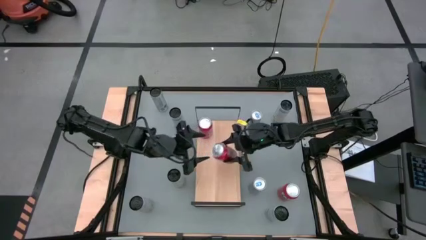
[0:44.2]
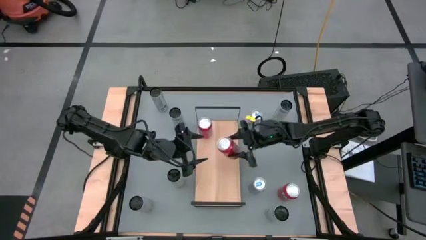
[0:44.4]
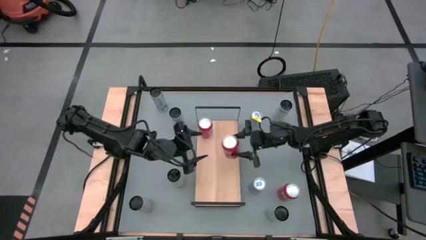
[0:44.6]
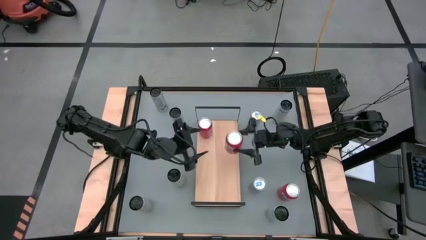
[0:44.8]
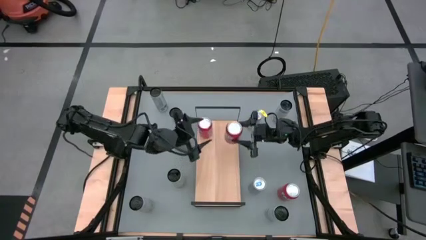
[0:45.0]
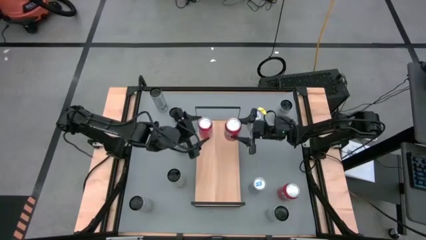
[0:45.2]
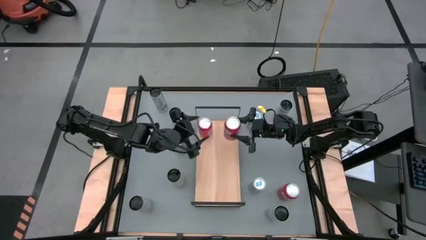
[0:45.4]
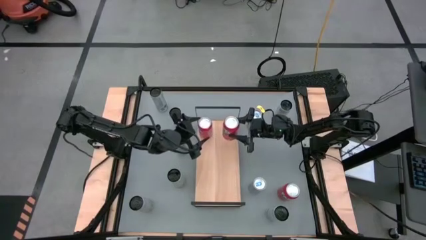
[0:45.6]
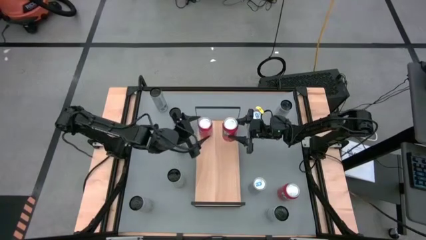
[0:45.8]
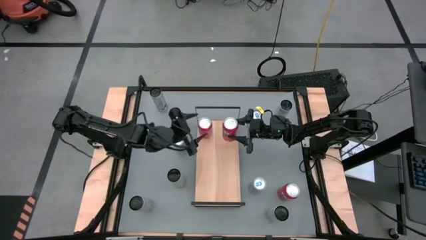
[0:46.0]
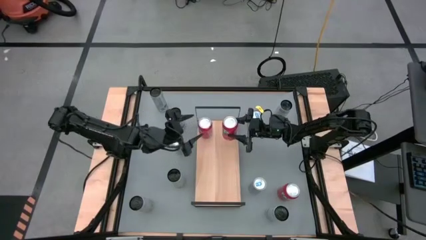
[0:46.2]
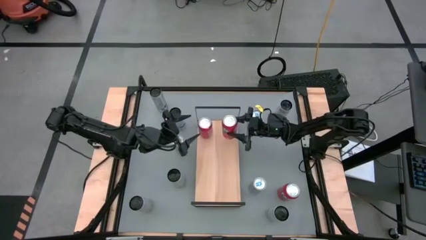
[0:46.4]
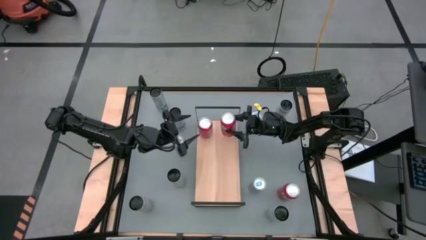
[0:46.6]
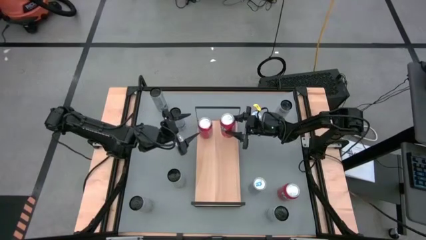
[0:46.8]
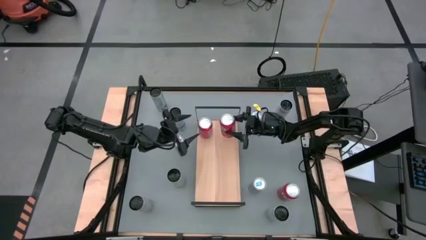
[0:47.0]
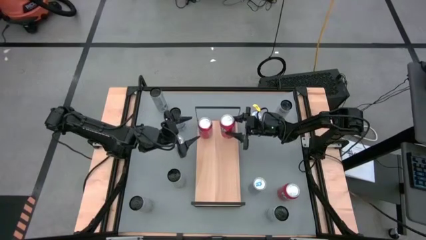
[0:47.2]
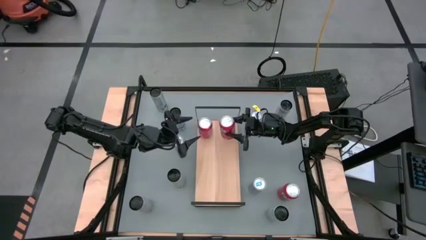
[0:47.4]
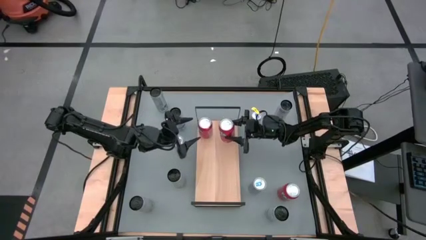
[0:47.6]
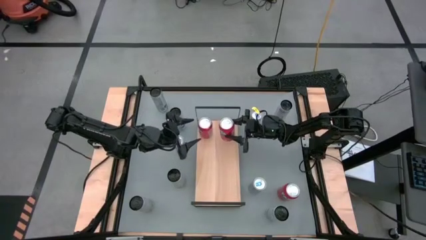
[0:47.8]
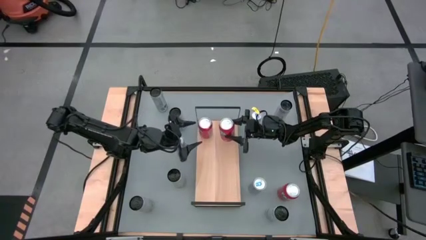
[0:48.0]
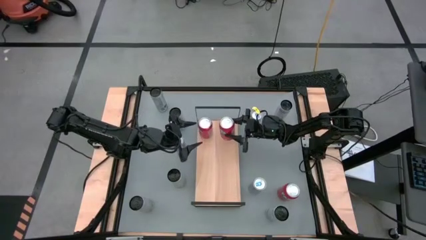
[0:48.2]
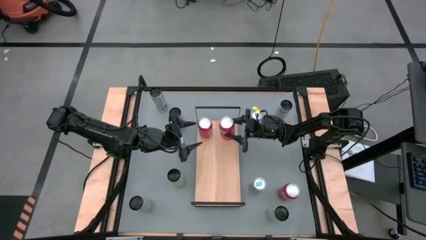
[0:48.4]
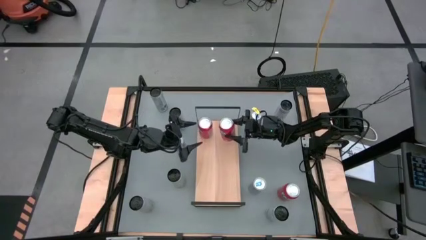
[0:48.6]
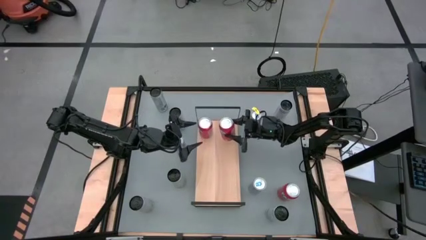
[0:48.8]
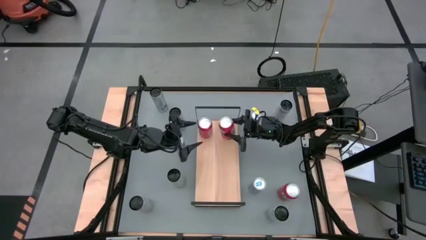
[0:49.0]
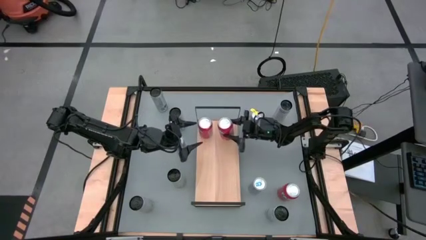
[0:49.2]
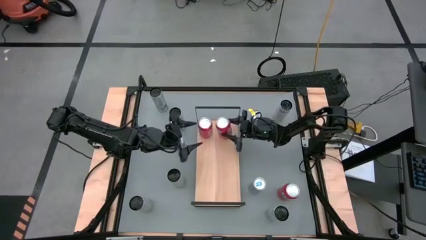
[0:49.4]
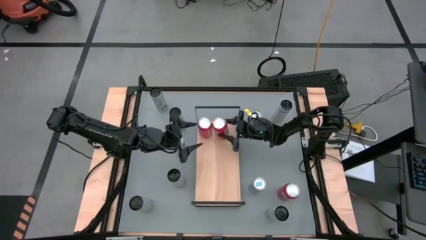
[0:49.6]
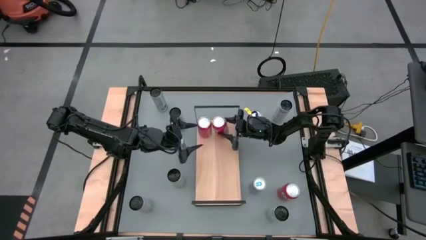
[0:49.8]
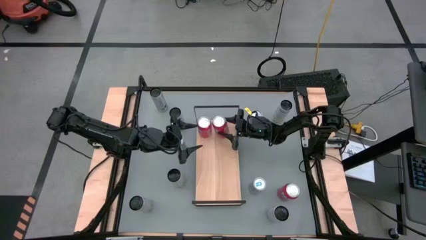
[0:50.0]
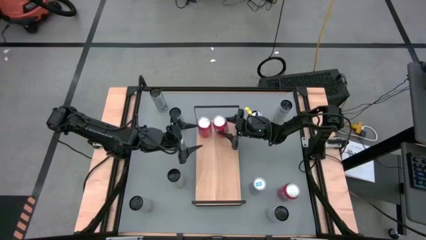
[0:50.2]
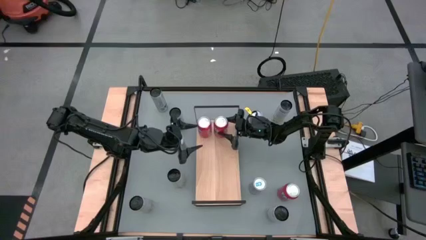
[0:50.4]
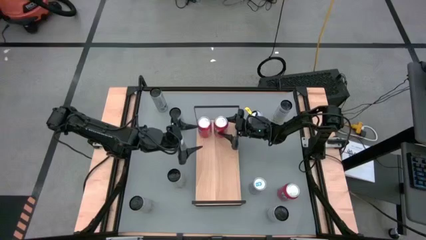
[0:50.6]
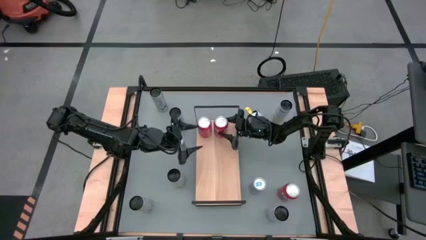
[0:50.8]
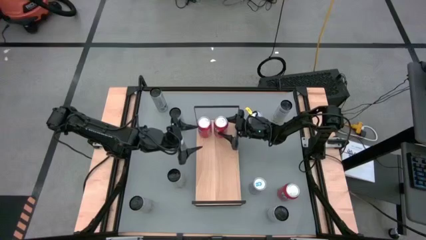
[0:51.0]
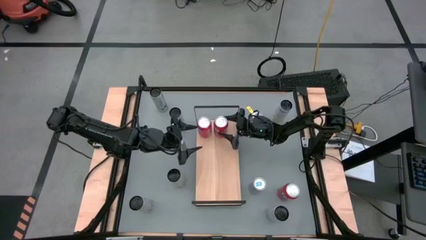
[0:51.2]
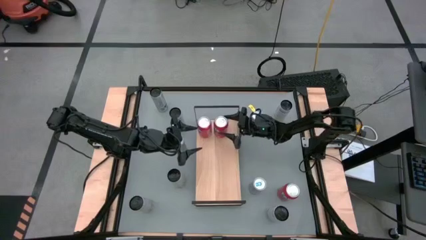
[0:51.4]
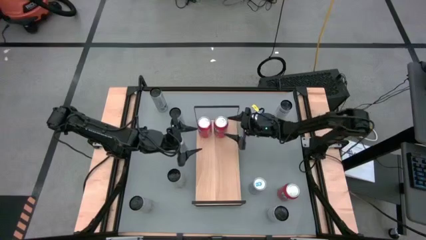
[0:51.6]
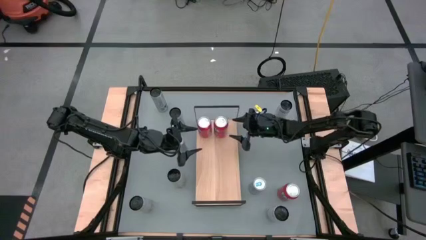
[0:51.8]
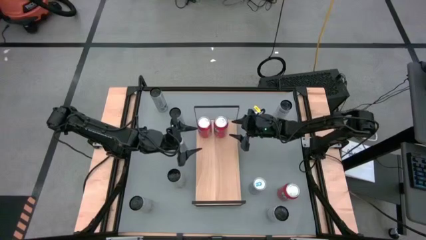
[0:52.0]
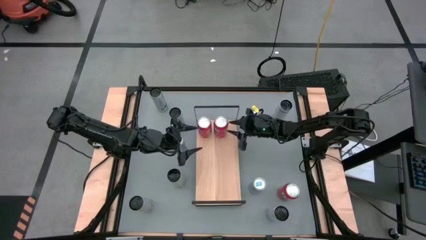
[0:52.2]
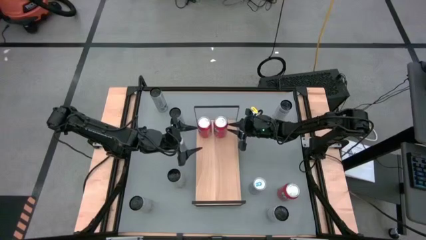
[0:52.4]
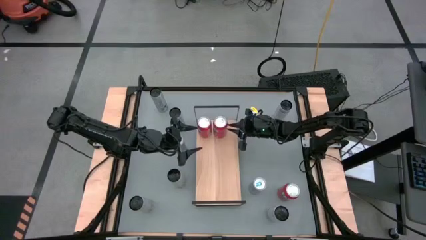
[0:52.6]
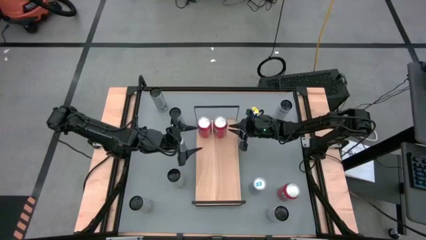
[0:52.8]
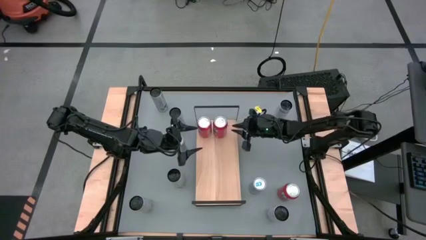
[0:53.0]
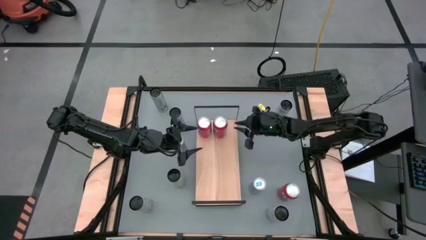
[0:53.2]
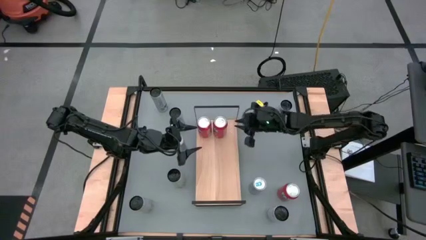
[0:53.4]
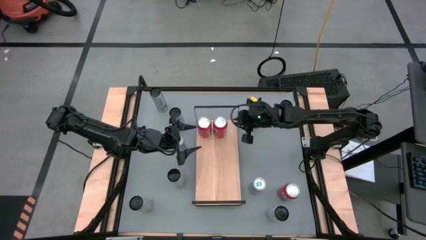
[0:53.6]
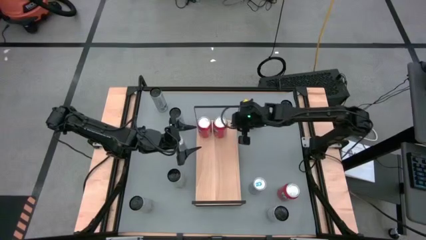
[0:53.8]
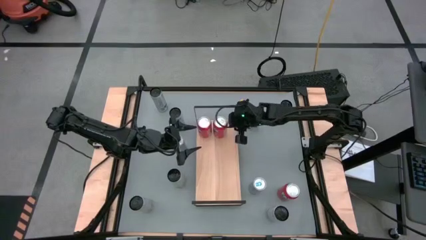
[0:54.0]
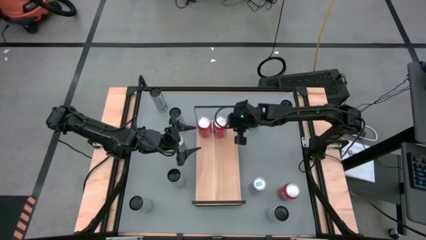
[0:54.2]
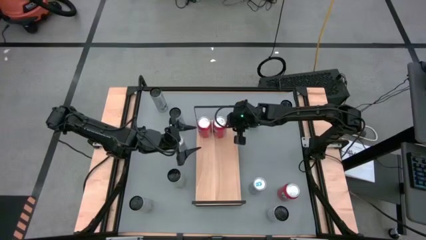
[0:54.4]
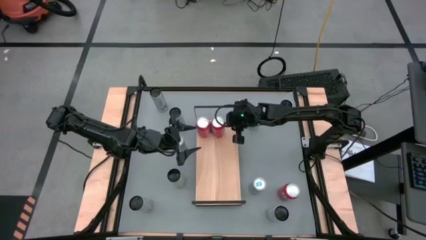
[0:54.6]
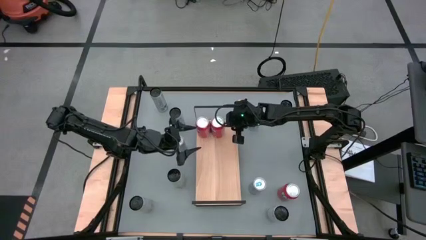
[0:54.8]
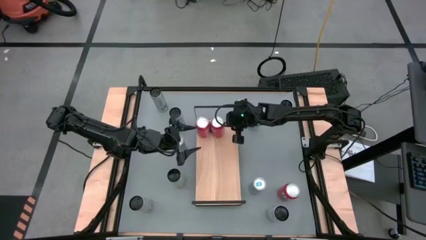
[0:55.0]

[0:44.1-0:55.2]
Task: Place canned beverage on shelf
Put the left red soda can aligned with the other red soda can on the shelf
